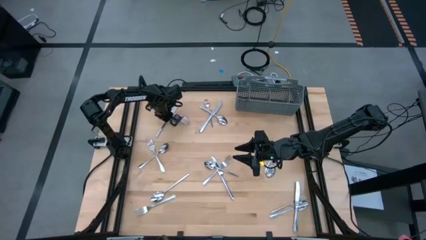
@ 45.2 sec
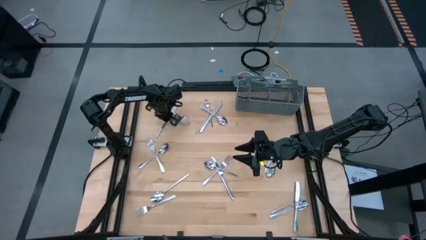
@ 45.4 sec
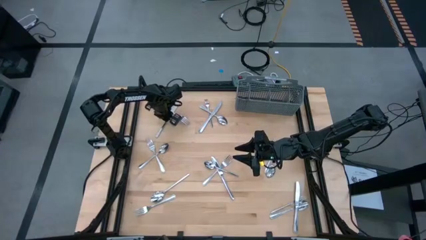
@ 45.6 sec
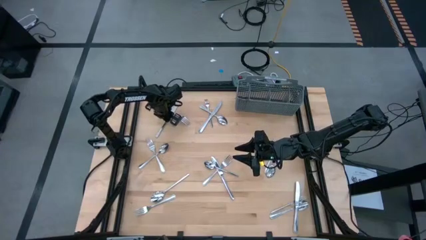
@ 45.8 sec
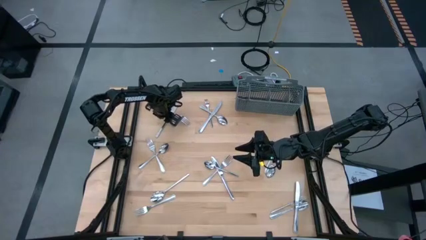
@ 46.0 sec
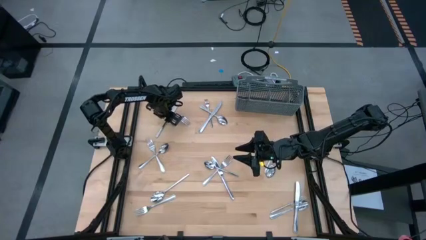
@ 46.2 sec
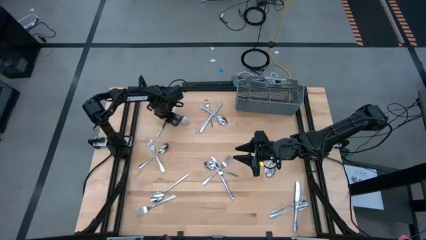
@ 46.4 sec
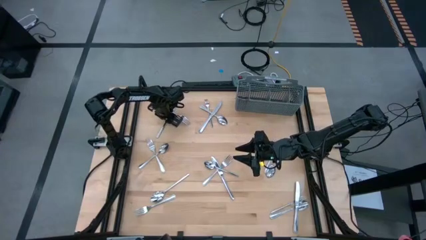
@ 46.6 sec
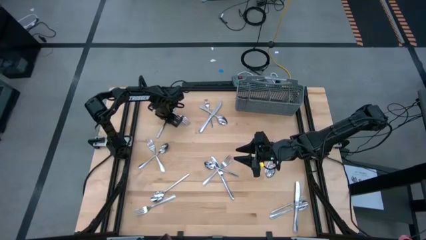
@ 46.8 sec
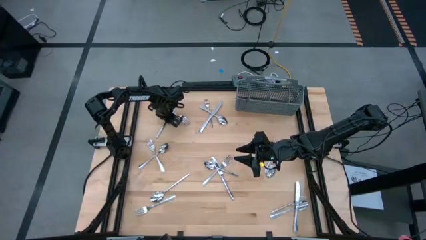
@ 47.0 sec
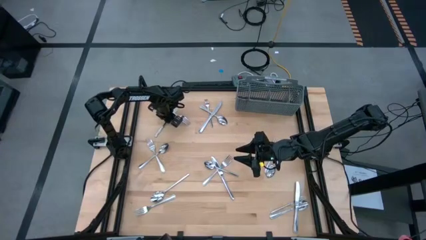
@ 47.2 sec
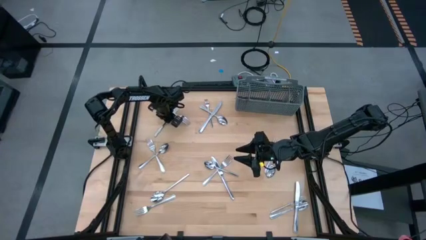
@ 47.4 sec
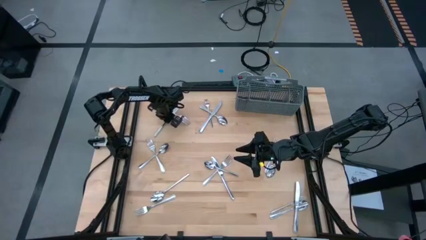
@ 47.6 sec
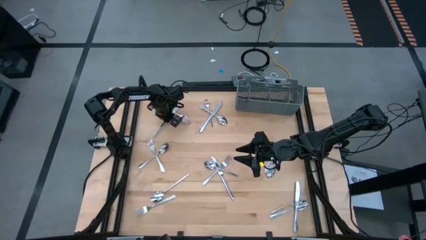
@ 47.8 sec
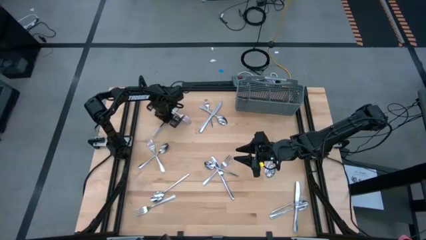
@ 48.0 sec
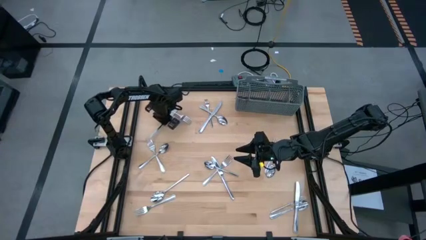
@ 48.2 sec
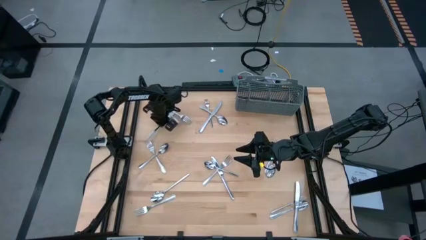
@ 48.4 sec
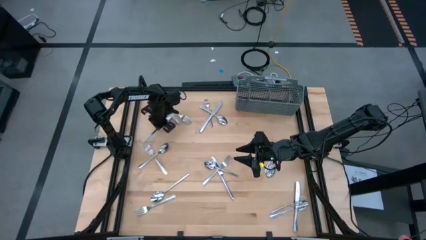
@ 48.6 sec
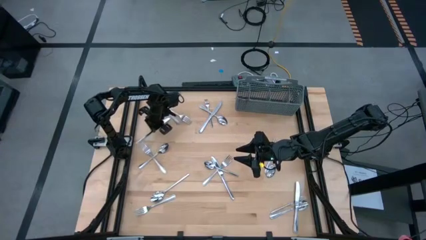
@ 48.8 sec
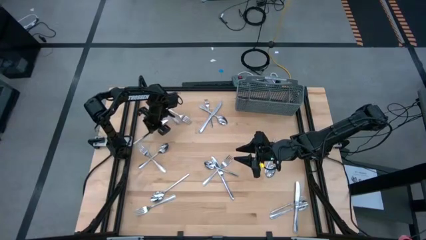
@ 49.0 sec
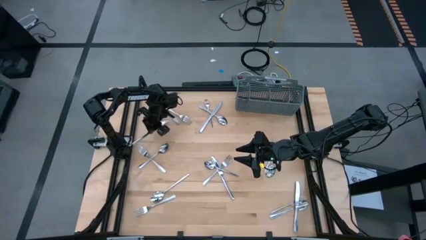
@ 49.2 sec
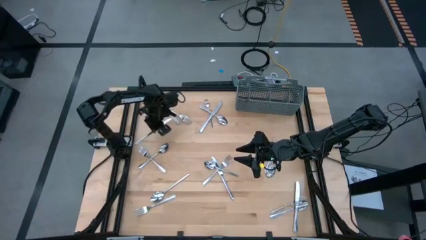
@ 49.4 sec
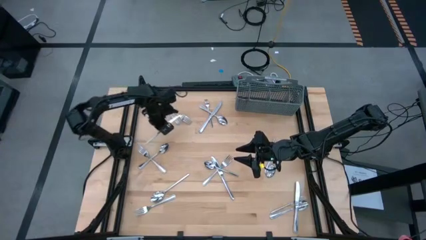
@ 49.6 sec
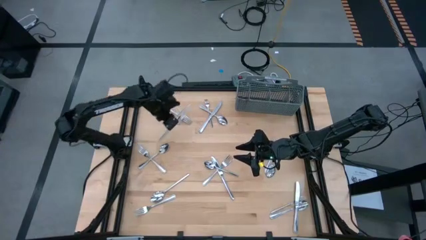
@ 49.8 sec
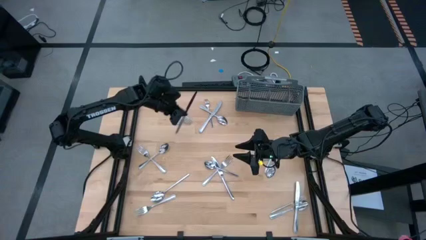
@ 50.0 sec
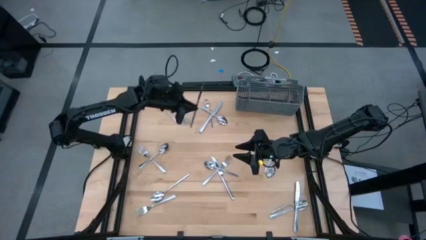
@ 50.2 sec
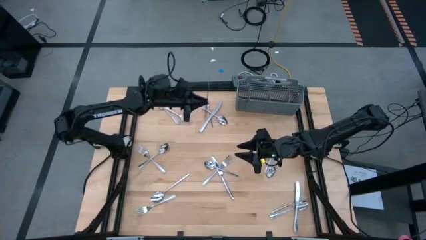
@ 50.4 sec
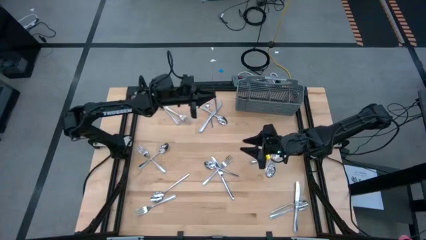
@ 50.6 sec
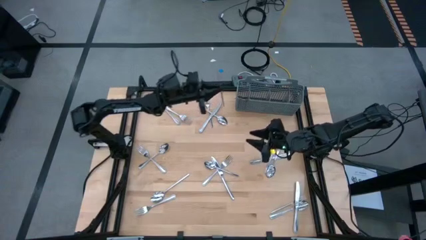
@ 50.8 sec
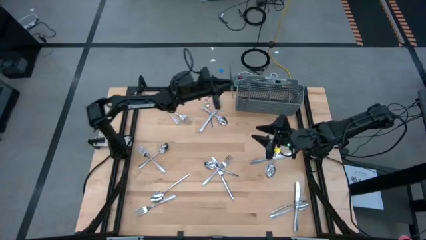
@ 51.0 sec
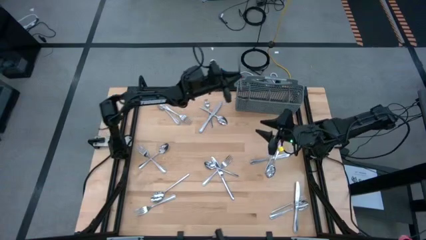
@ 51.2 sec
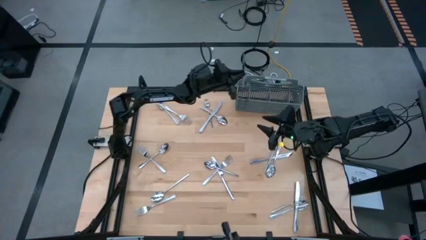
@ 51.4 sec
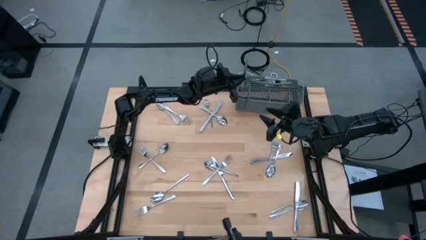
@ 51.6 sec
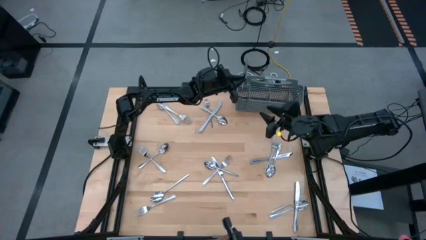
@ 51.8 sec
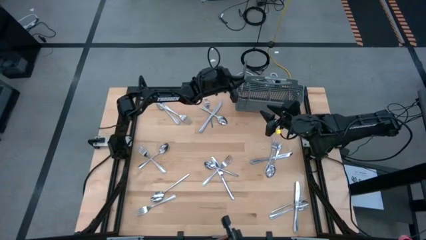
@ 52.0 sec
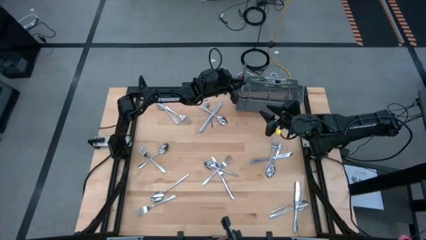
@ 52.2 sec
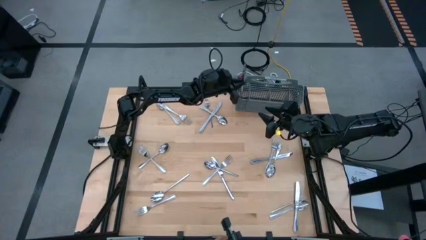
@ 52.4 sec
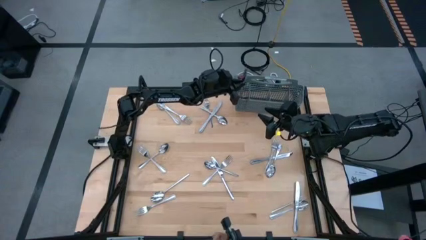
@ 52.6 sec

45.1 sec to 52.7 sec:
Task: Sort silverware
Put the silver knife into the silverware basket

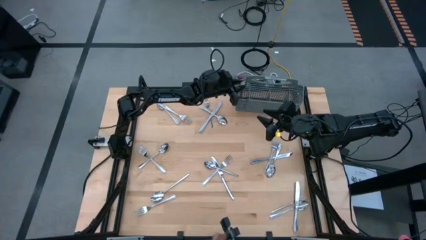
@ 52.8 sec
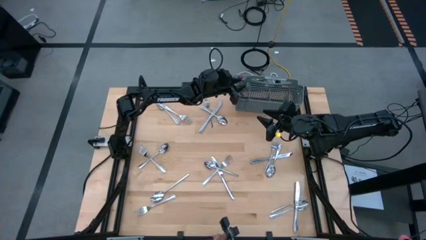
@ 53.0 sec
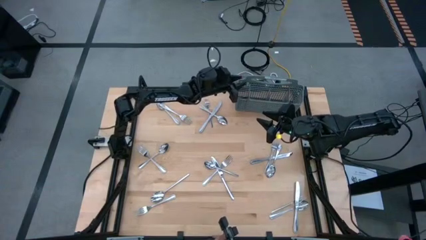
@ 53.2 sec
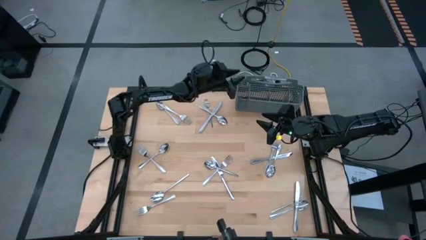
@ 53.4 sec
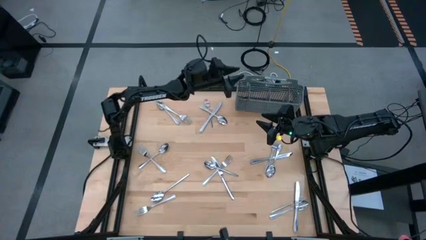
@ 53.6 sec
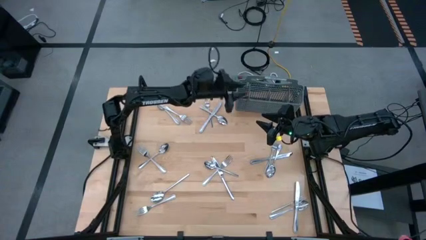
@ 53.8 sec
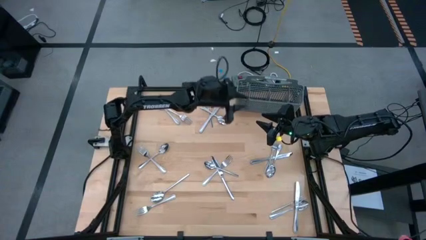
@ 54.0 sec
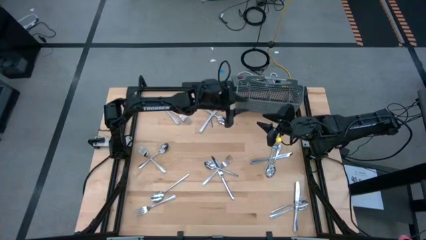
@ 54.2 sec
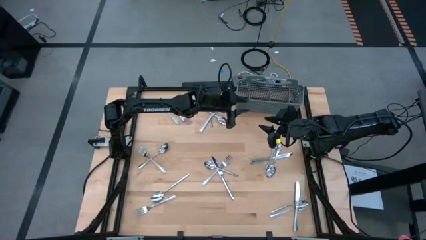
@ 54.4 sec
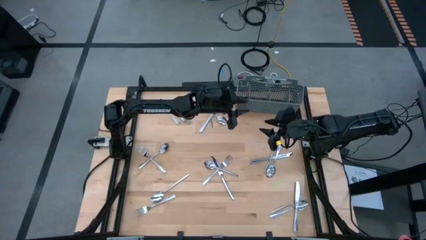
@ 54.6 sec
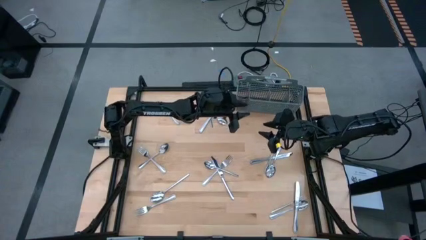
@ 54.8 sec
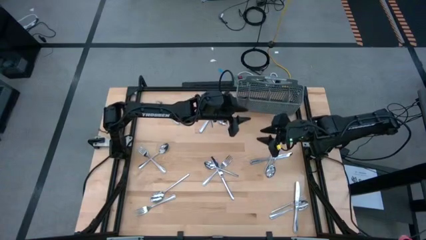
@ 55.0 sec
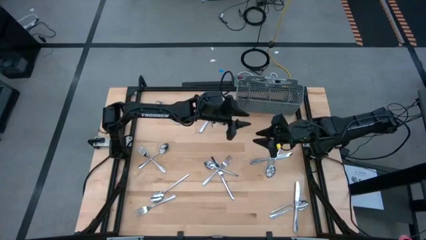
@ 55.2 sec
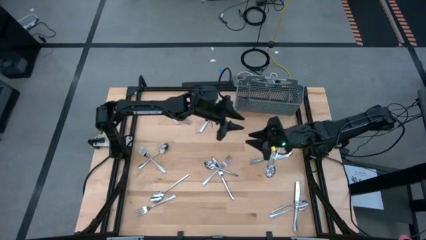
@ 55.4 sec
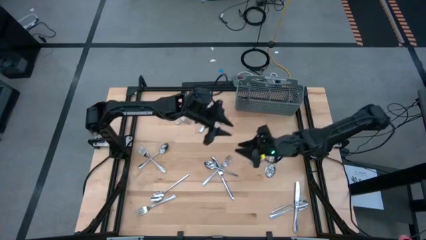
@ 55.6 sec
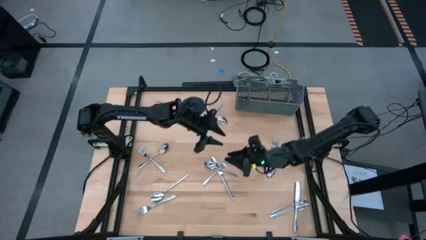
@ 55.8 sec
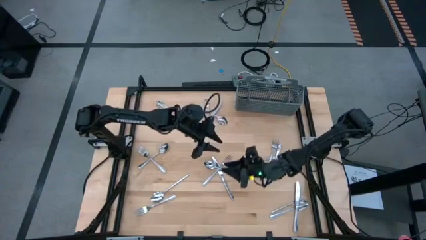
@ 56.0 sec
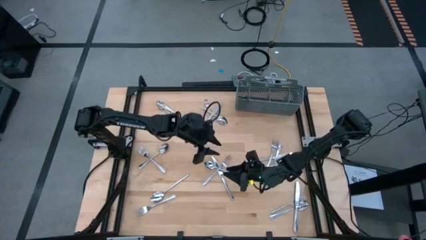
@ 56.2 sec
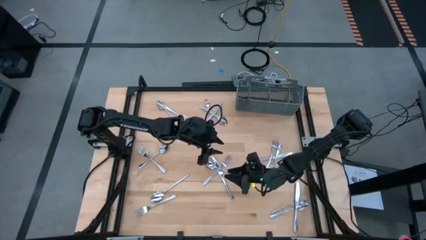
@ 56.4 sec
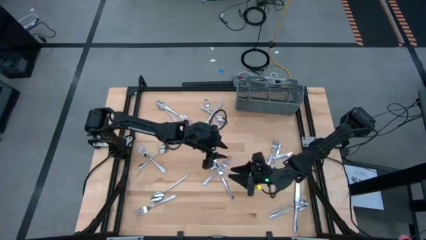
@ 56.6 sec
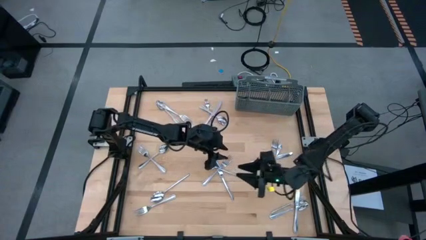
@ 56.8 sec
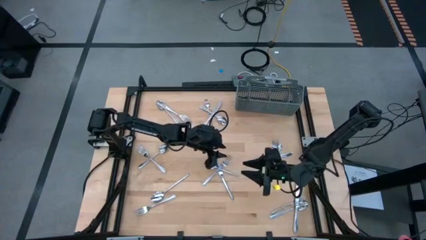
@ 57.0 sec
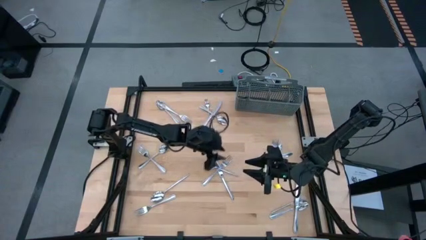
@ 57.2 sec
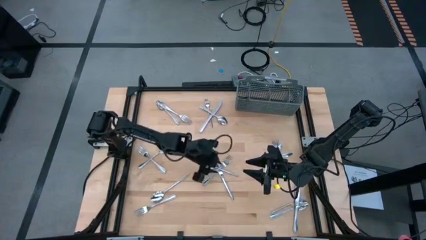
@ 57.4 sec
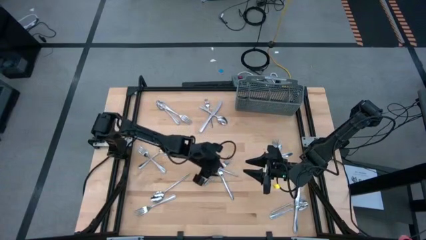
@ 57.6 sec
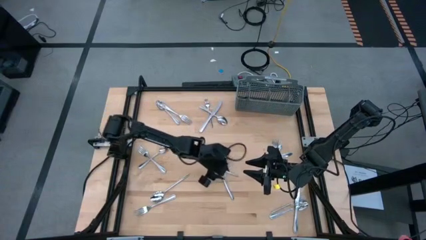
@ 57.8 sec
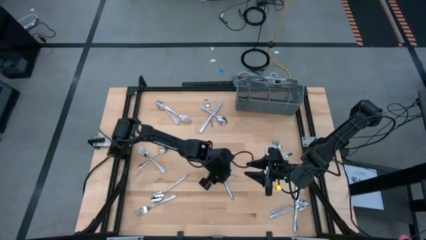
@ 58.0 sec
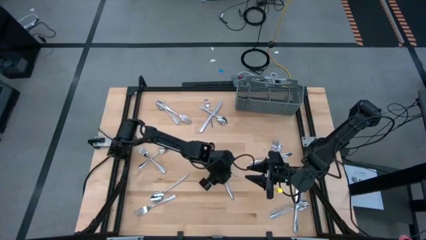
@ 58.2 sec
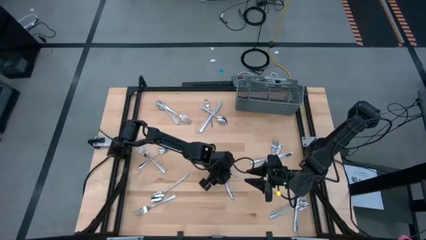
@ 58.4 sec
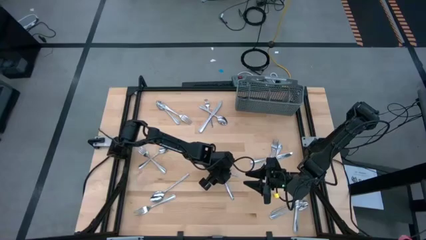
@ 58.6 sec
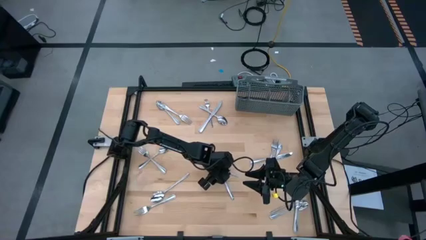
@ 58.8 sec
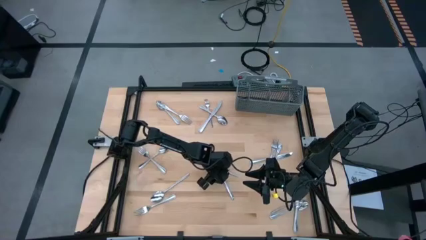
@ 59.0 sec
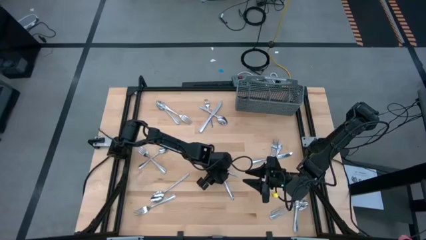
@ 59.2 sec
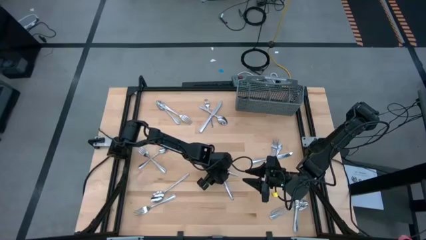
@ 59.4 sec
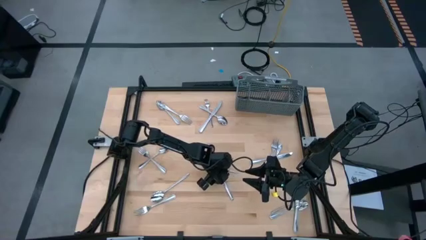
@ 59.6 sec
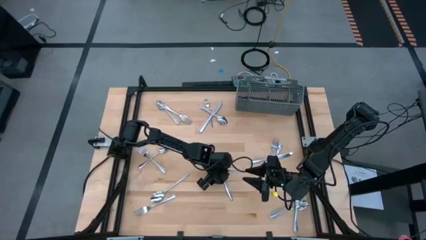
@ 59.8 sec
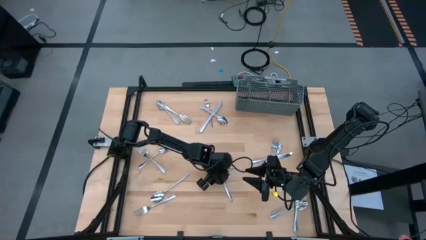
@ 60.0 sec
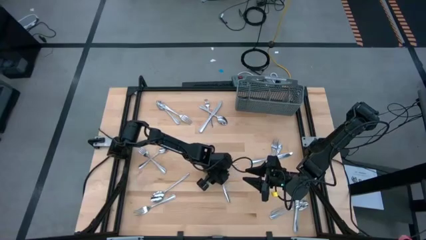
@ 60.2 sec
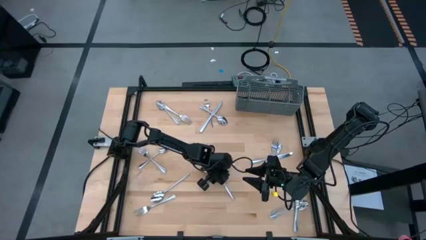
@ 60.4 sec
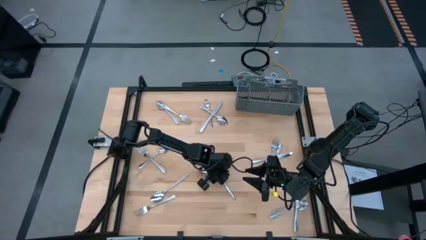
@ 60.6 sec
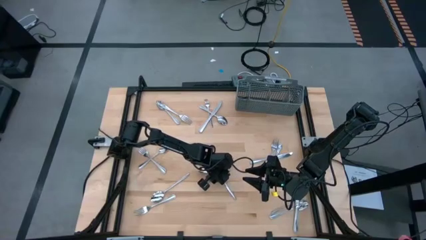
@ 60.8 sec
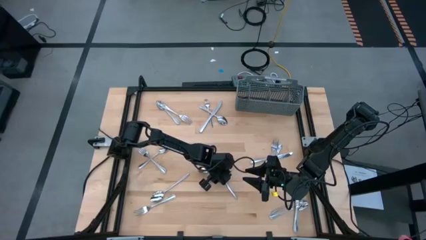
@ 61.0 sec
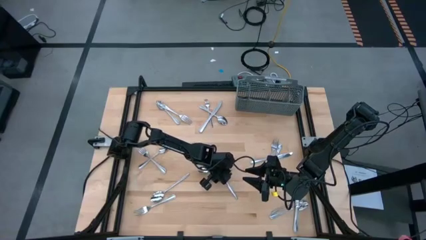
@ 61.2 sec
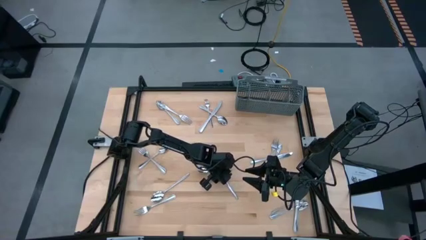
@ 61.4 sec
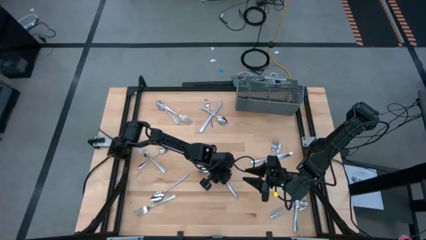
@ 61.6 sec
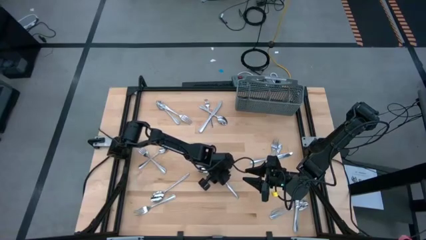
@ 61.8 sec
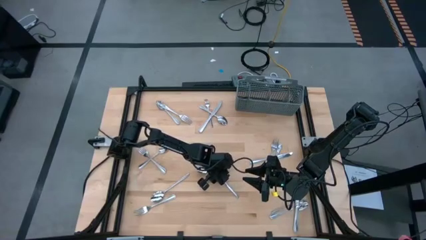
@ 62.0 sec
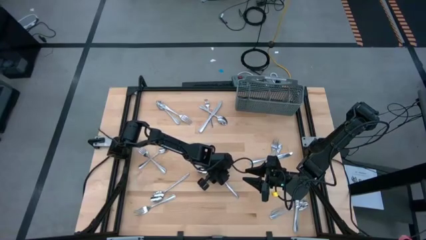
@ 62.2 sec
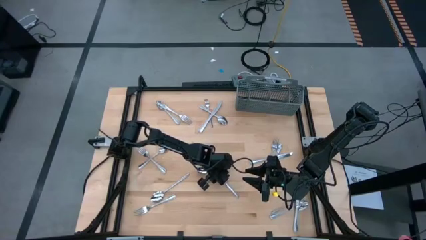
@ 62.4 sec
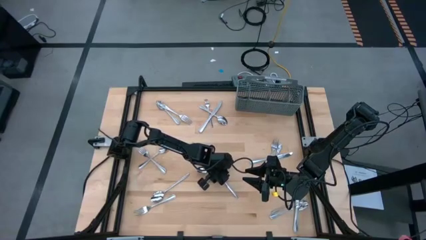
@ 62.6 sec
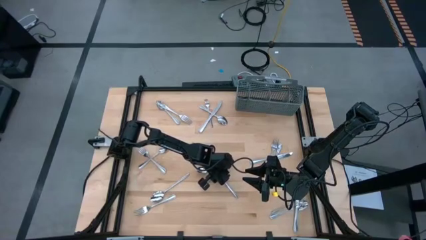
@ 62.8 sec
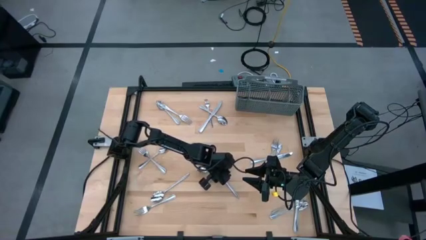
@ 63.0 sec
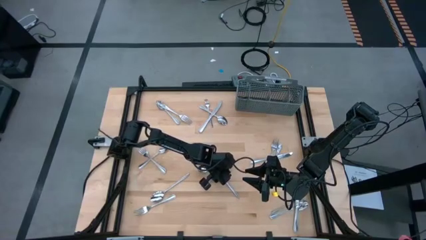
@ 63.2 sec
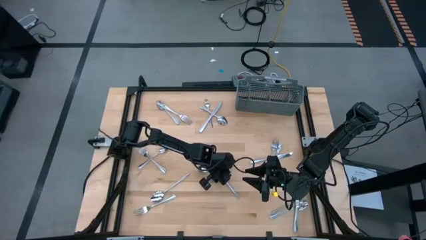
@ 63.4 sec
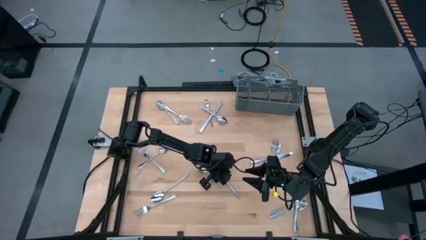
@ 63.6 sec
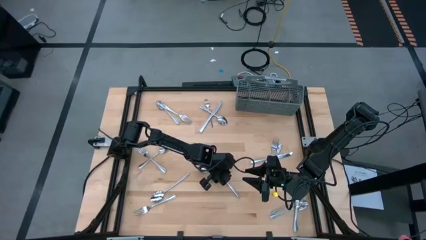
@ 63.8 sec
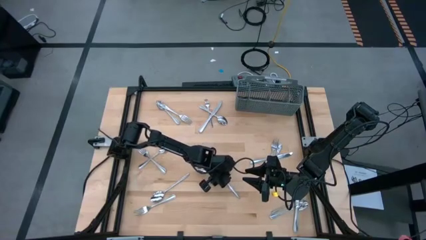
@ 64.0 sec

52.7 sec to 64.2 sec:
Put the silver knife into the silverware basket
